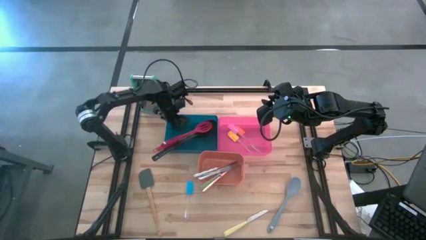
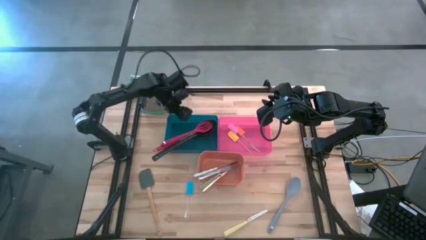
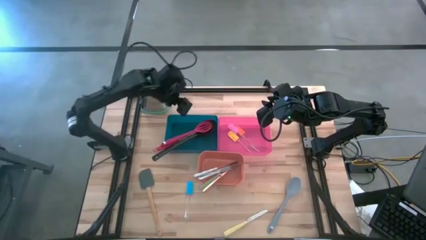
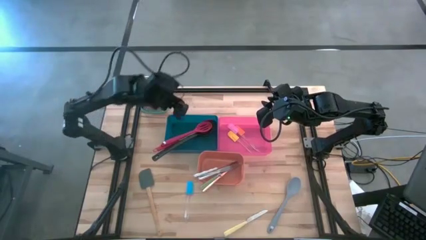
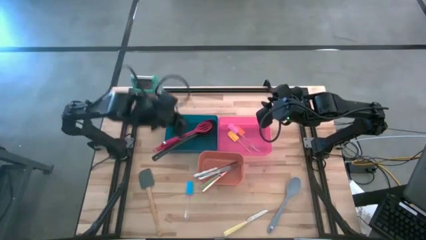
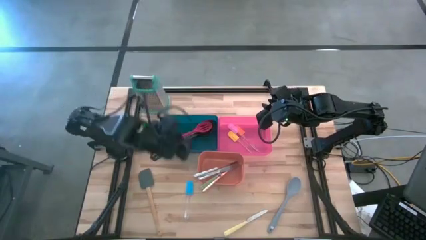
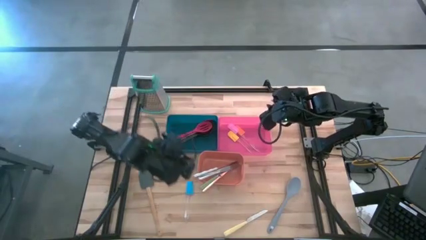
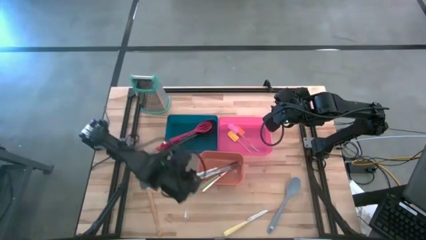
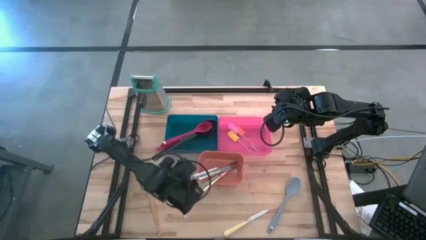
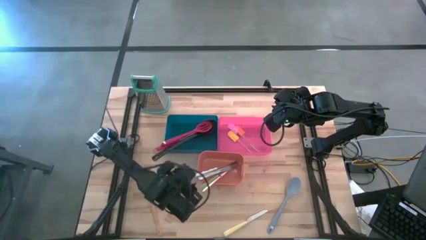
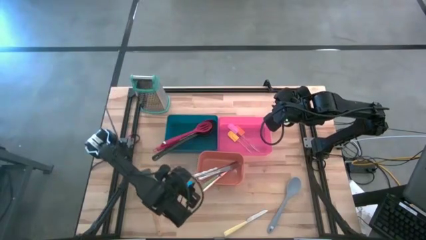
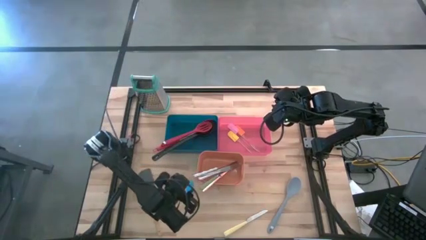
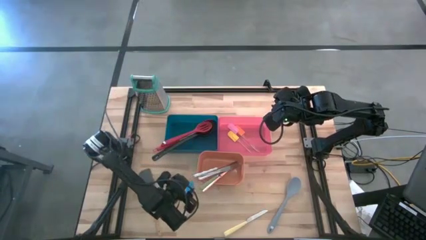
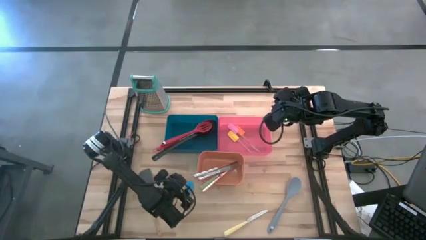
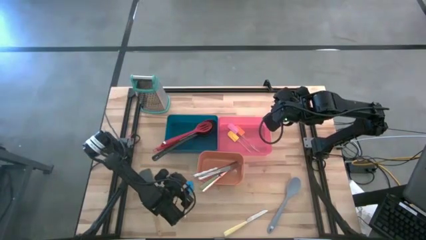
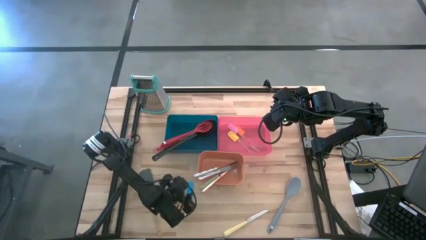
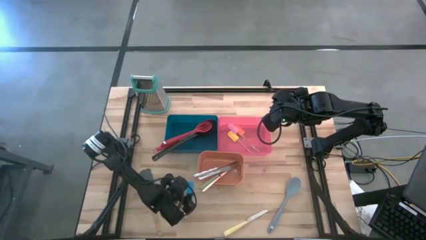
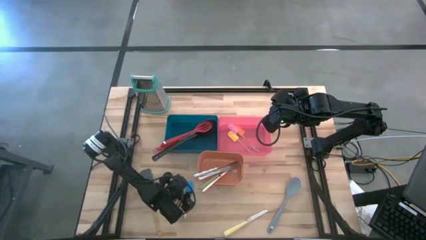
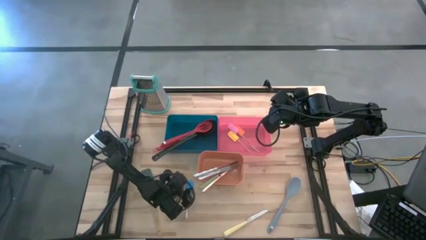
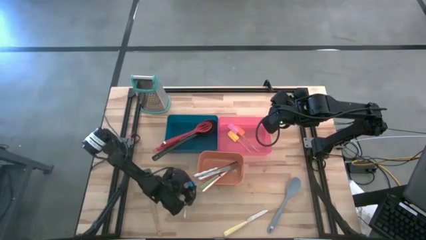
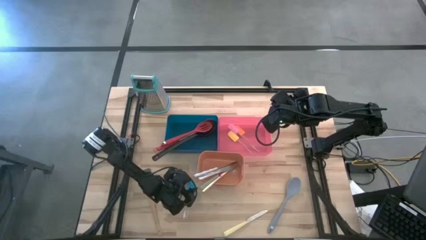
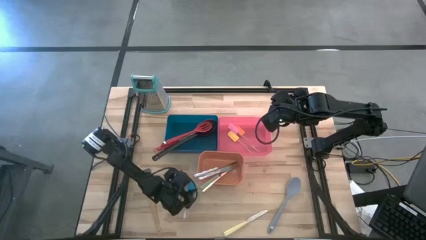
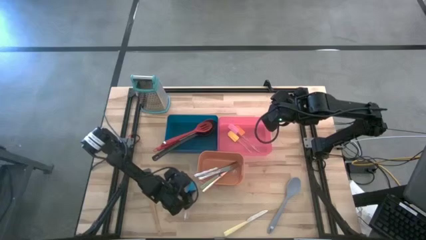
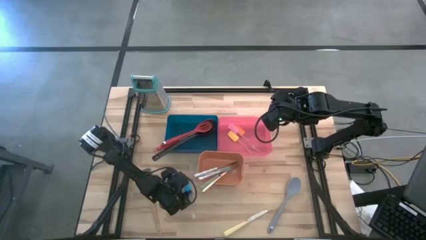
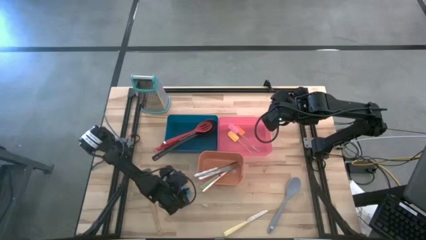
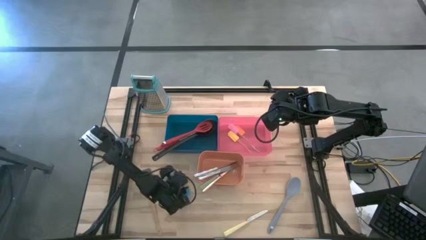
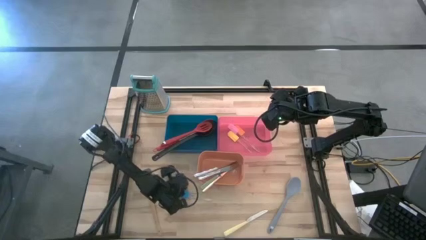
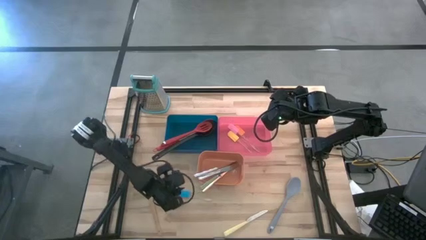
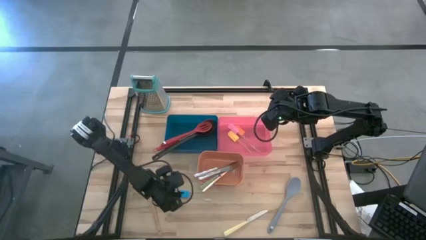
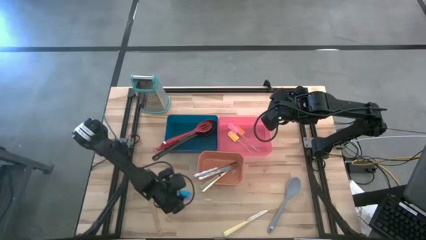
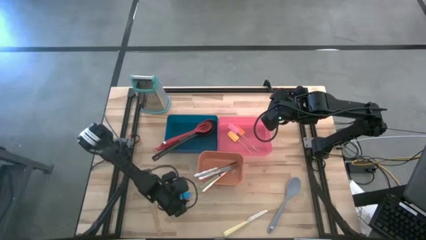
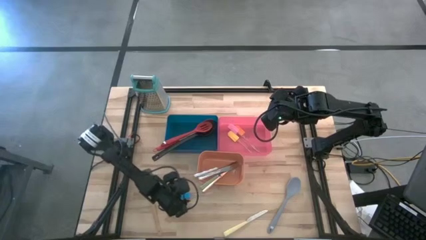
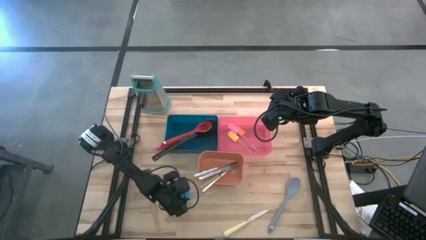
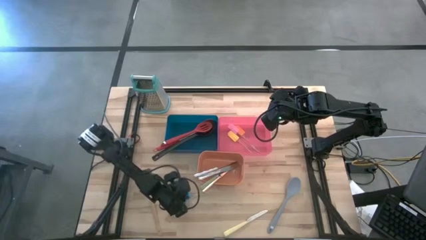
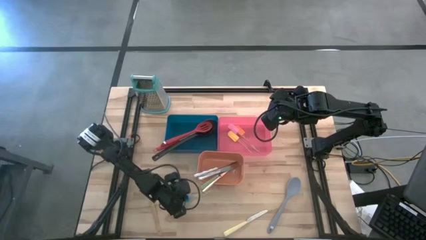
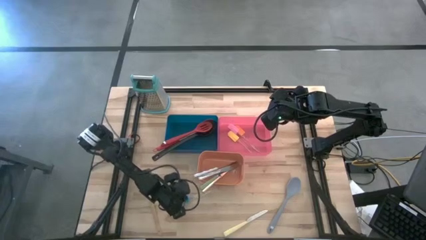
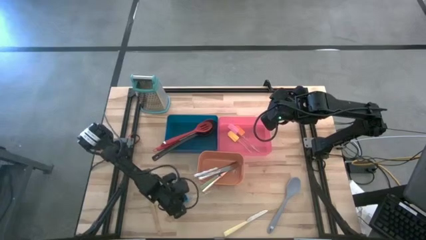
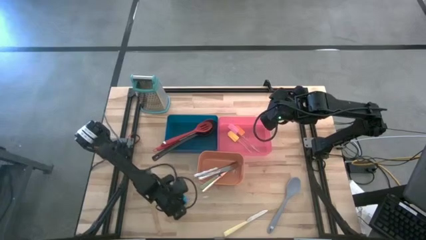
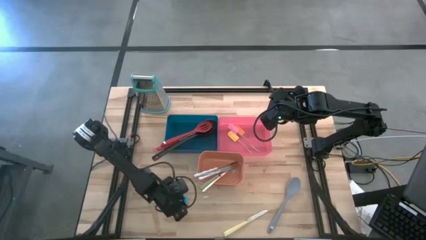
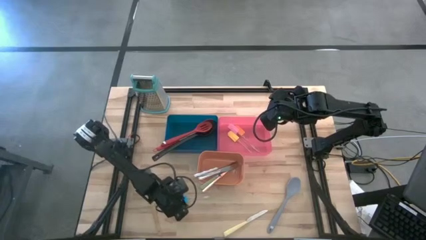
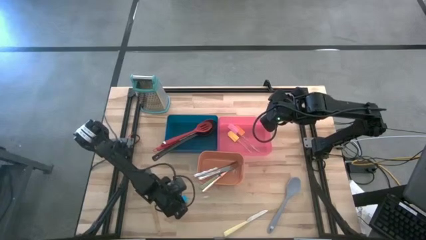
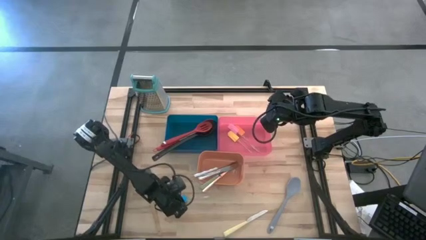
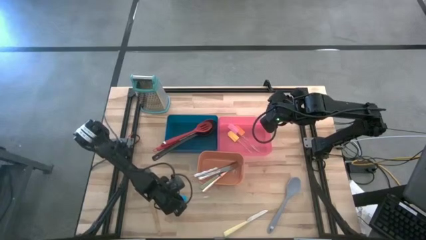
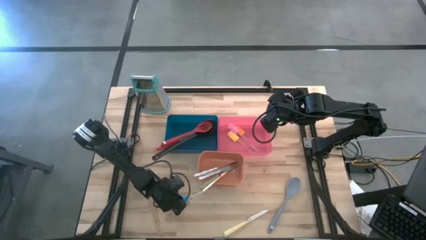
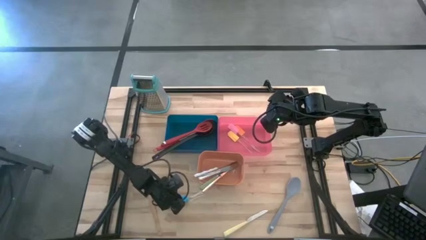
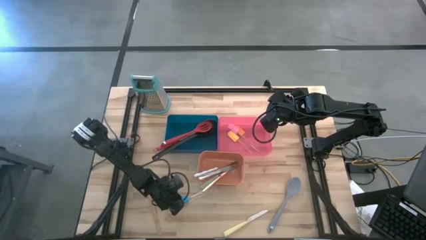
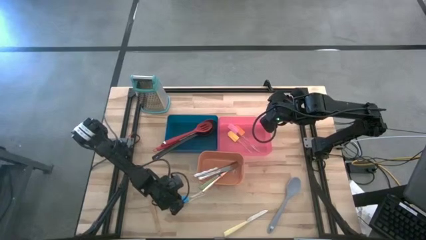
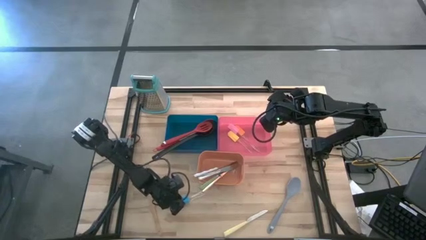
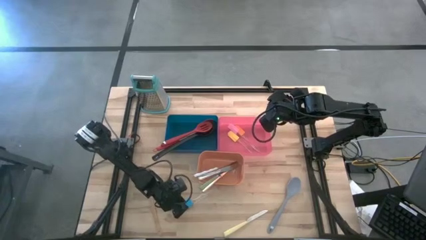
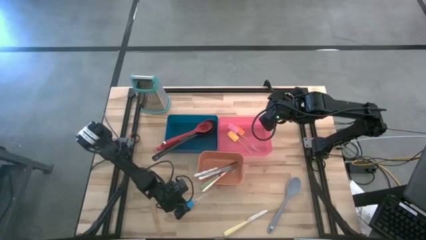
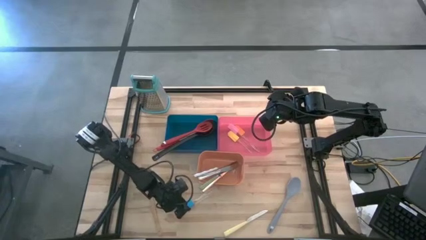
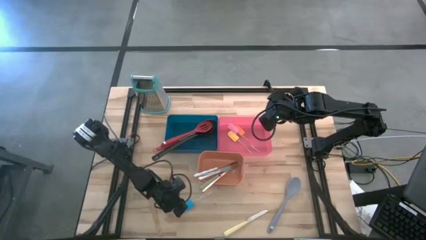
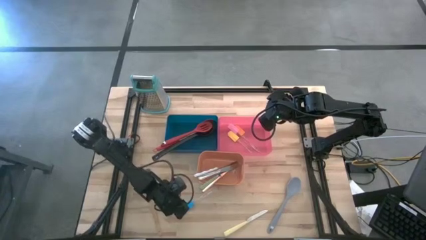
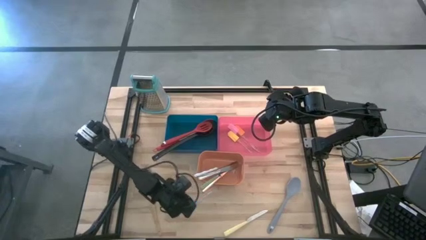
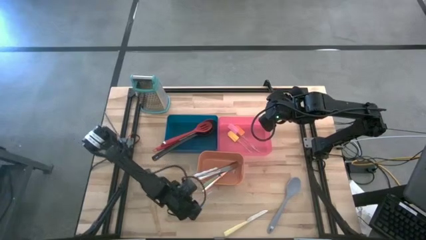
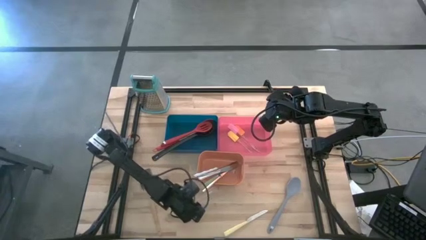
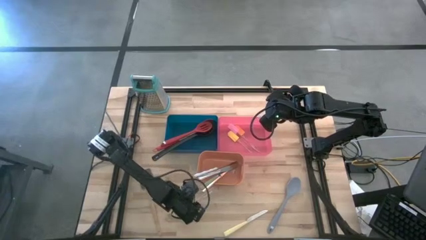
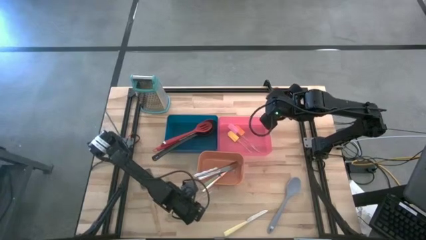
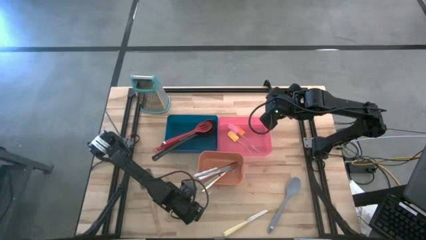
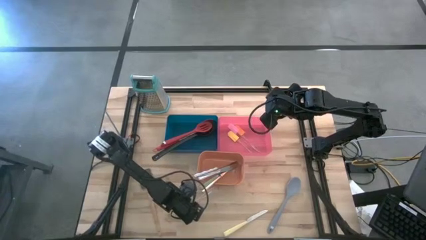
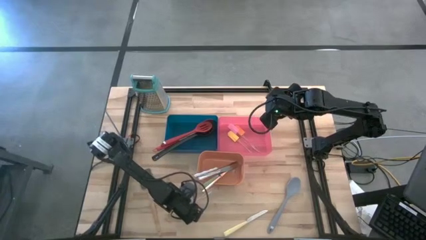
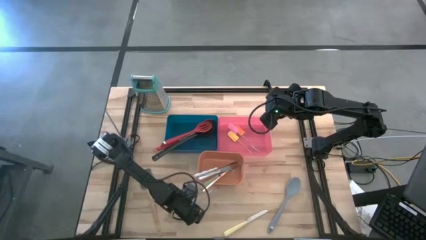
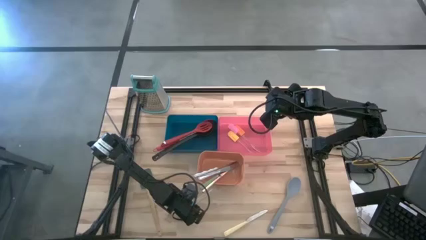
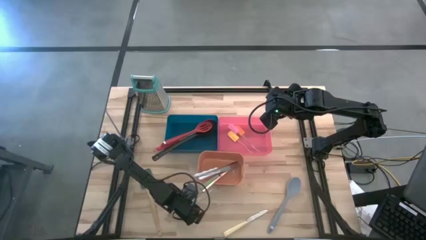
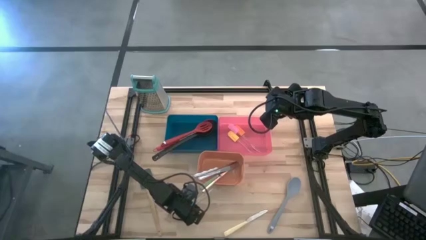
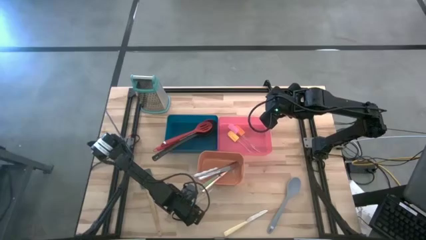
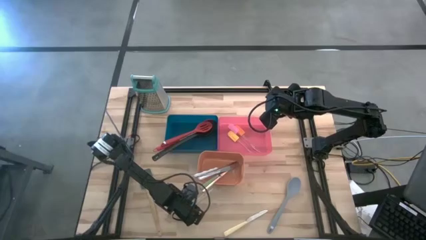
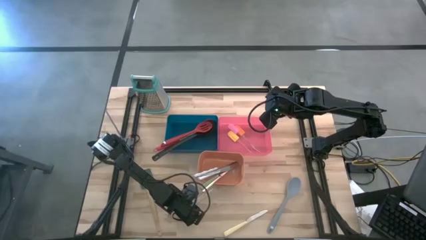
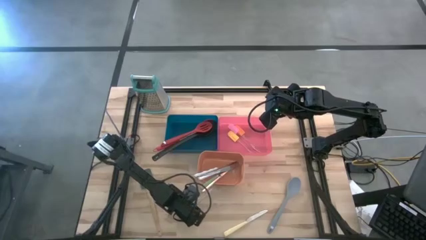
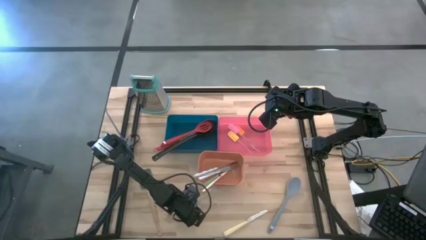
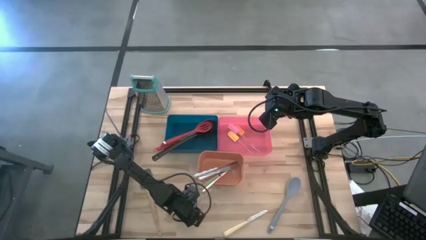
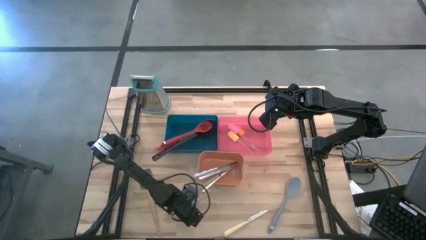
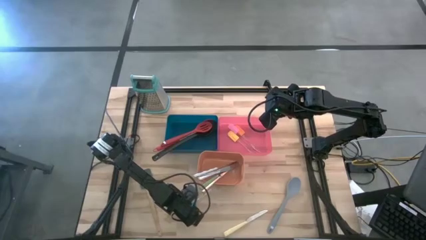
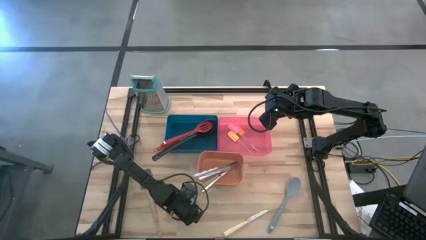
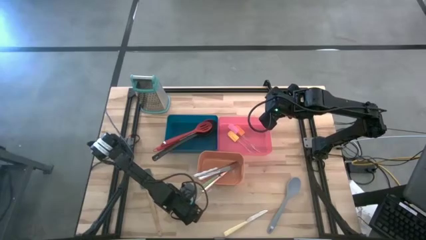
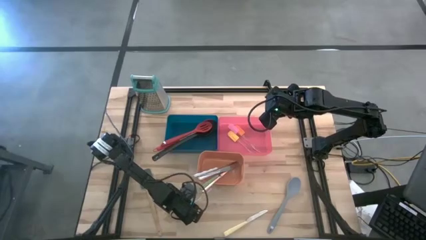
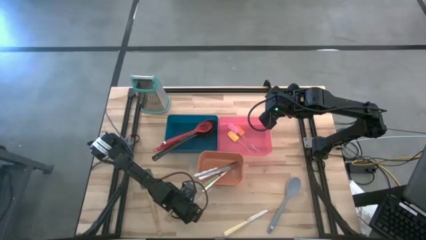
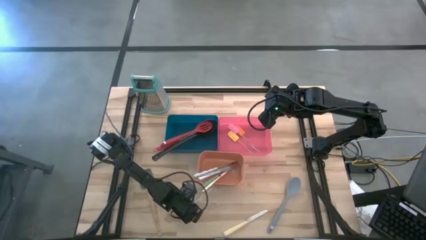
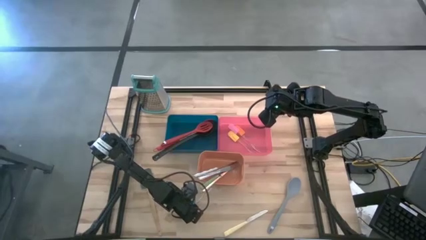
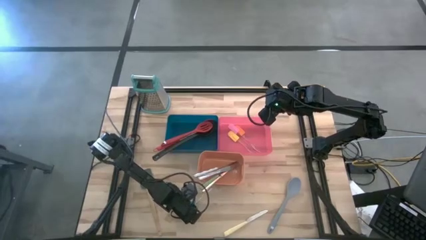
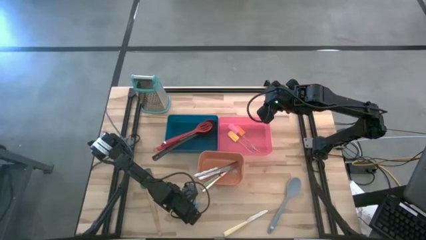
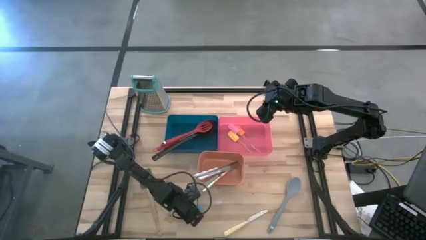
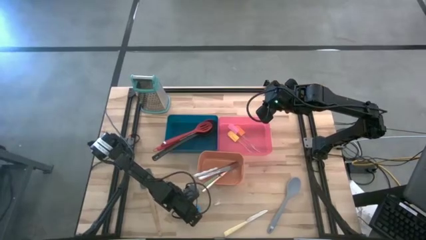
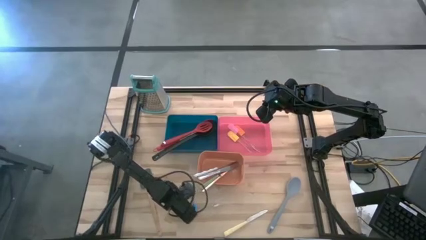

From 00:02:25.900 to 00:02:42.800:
Task: Pick & Place Kitchen Items
Put the blue spatula into the red bin
